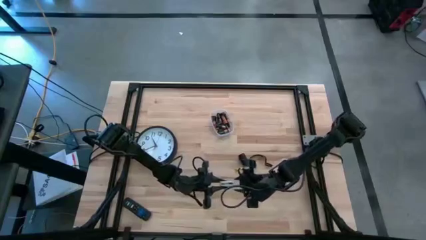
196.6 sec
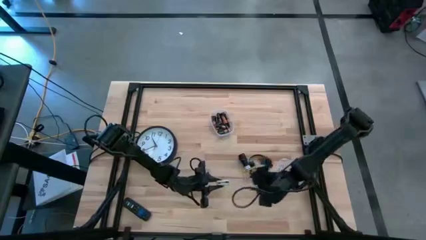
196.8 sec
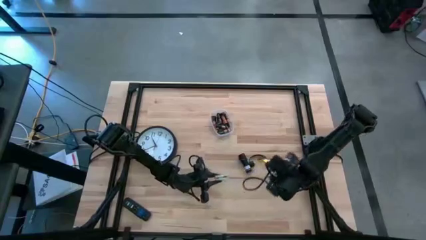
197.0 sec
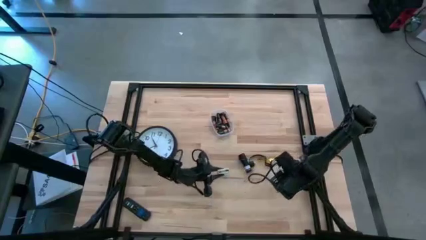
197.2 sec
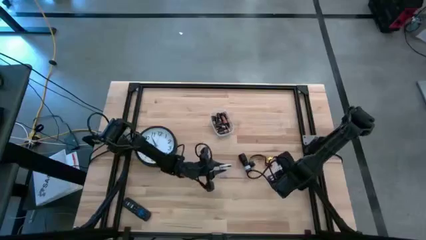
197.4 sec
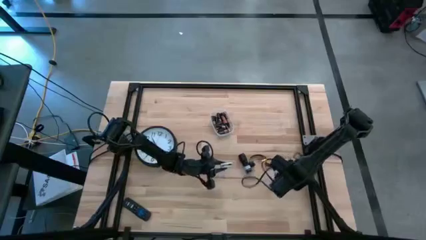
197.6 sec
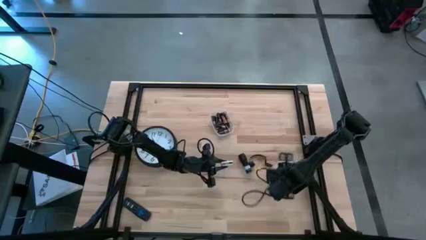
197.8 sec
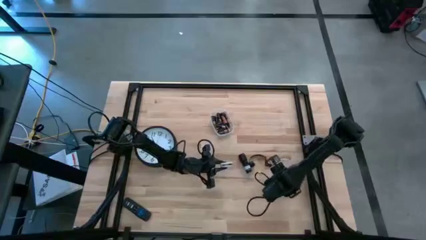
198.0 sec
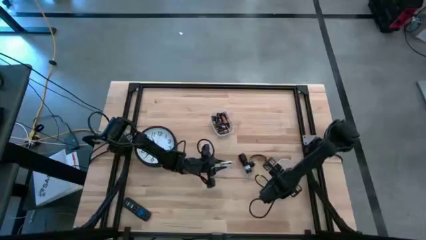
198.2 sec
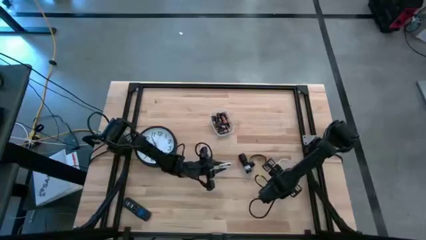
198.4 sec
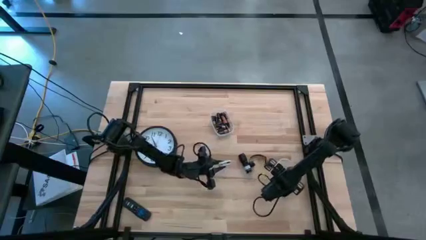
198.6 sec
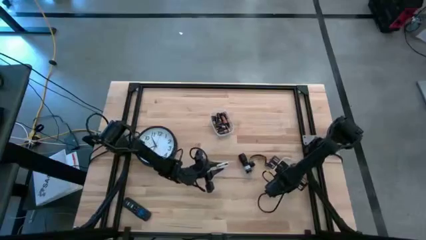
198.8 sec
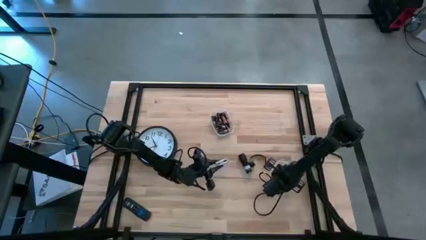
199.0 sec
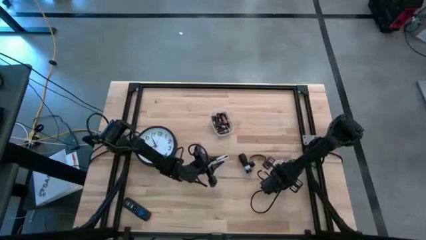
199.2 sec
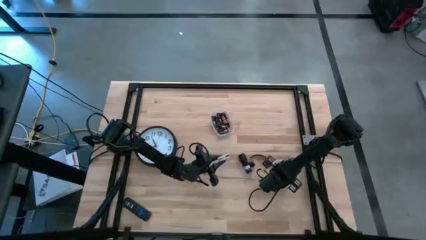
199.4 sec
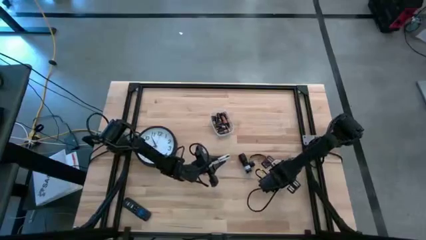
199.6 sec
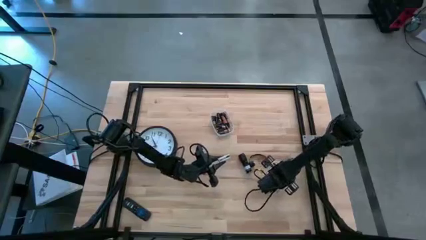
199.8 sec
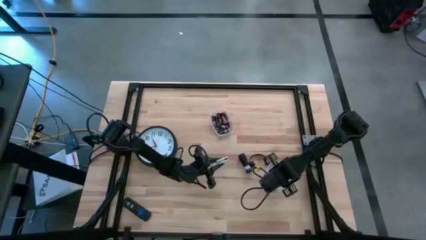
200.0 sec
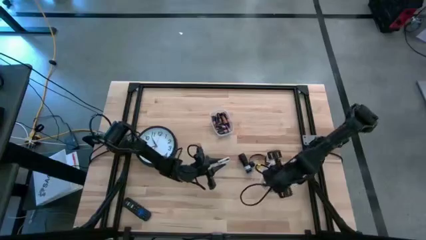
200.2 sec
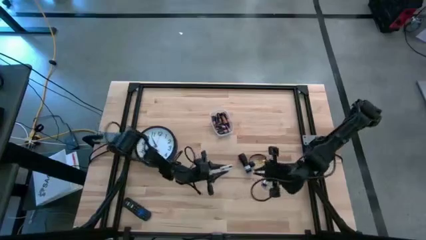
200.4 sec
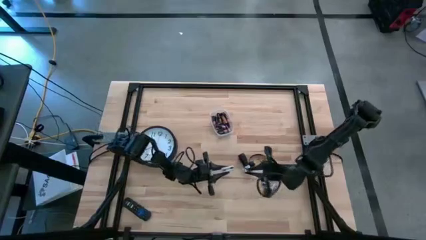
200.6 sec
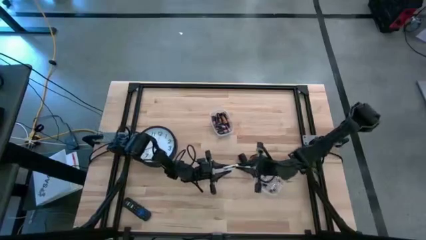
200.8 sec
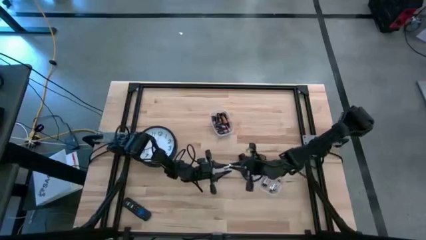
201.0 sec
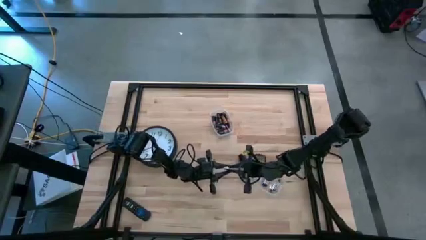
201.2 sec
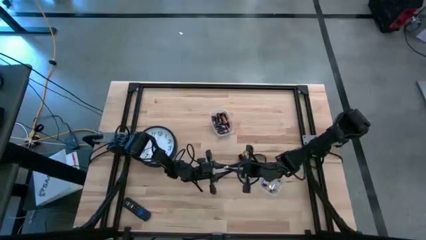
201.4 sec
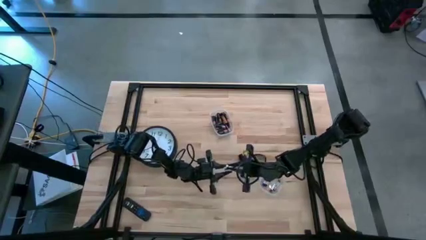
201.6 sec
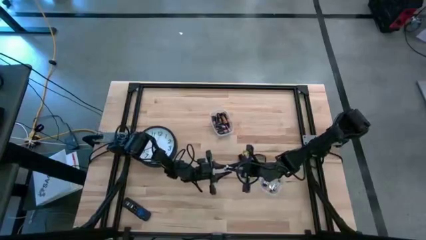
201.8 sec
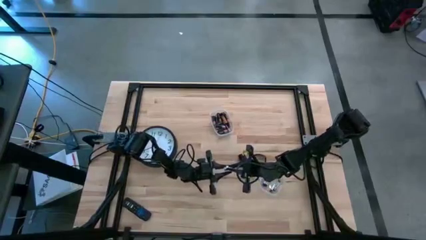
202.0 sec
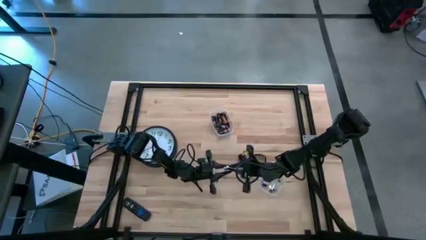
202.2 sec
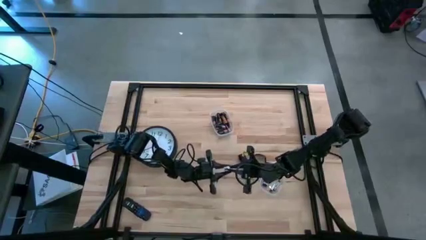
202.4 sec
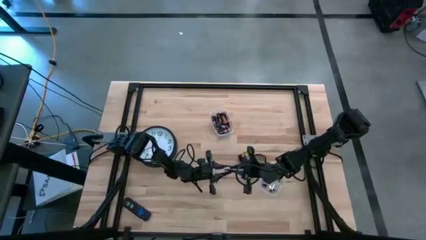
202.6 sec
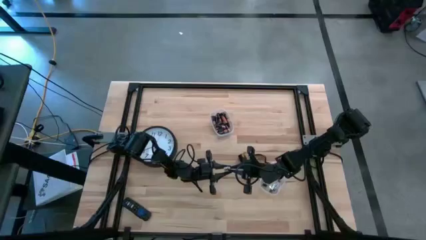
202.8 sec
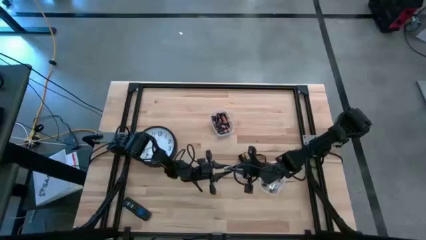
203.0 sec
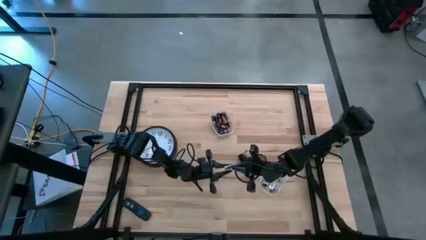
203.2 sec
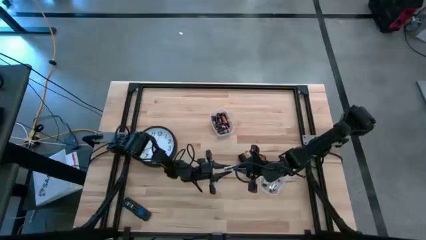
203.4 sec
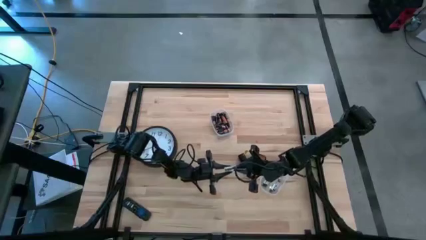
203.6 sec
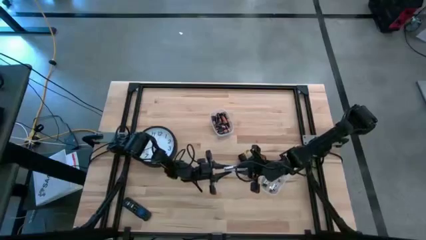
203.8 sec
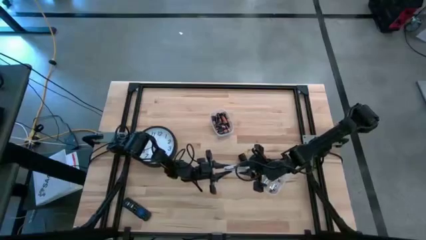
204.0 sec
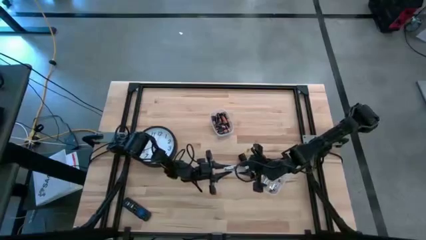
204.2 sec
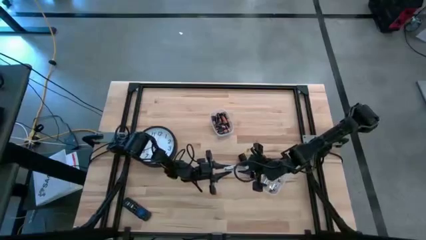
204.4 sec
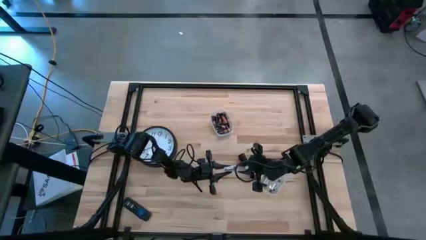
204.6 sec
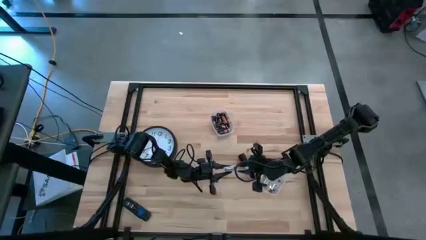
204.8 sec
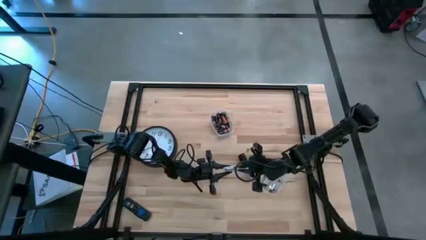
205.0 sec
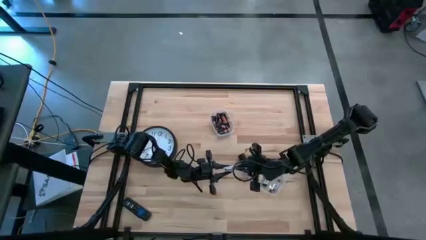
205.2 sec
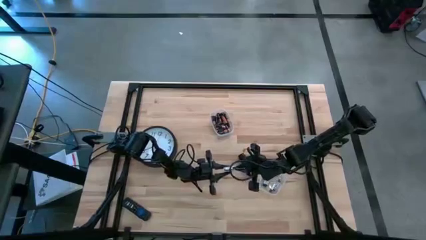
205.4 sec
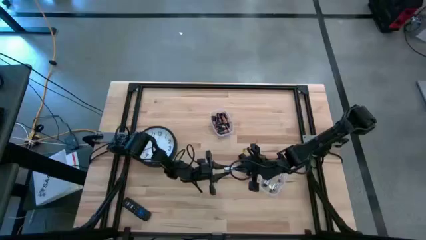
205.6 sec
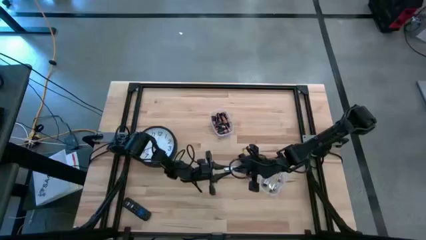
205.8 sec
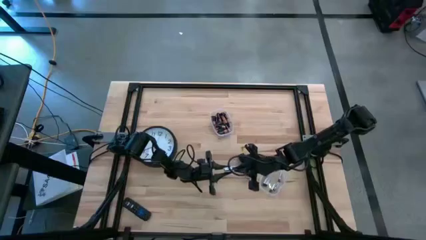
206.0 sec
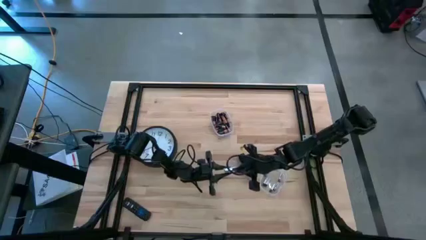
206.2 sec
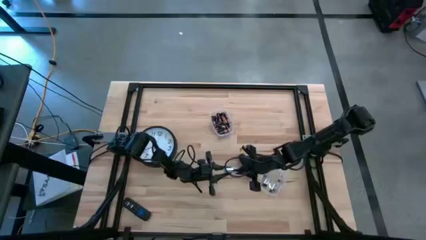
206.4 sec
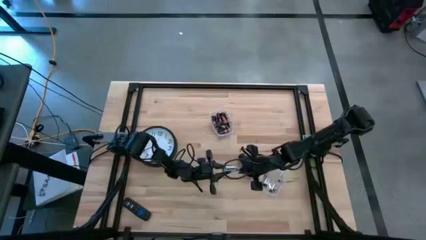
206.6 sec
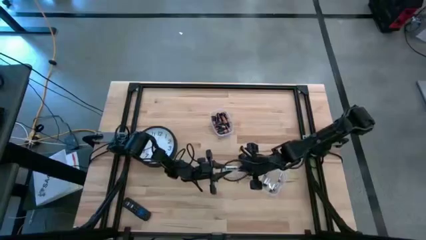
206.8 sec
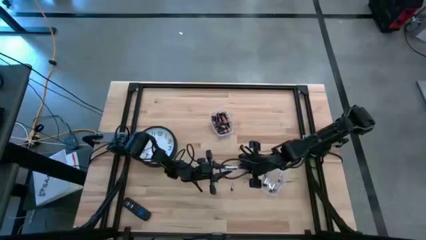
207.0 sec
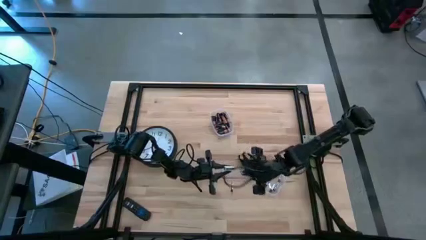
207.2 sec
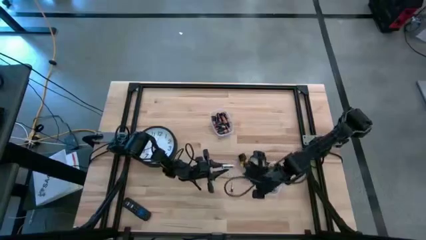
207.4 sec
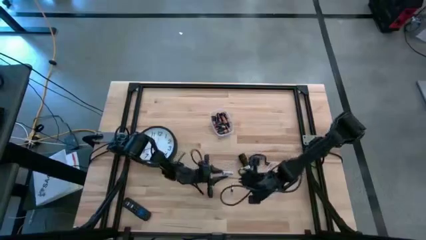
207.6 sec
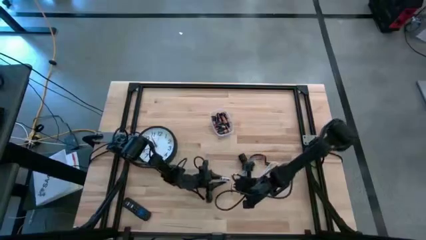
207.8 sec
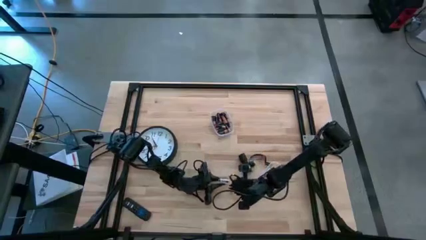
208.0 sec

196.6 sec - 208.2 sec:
Task: Insert battery
Insert the silver battery into the battery holder

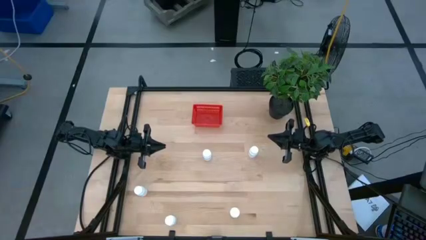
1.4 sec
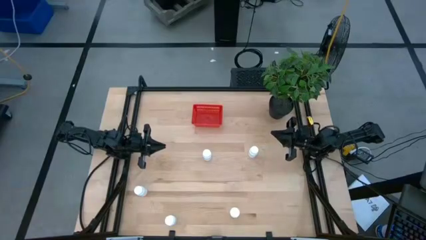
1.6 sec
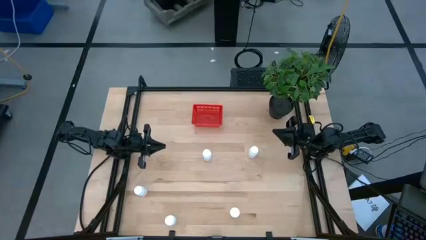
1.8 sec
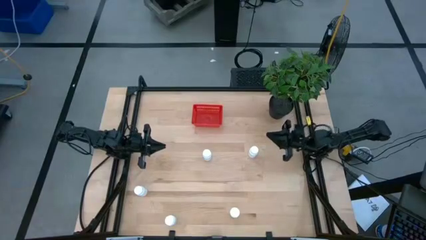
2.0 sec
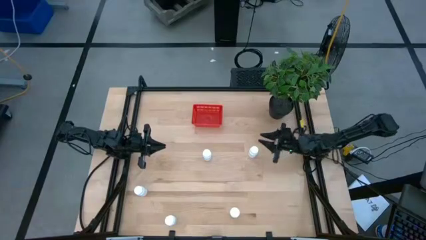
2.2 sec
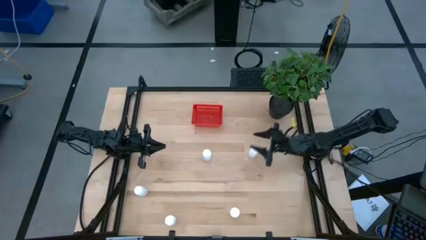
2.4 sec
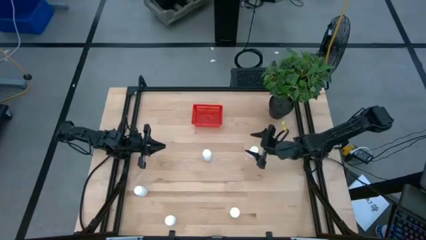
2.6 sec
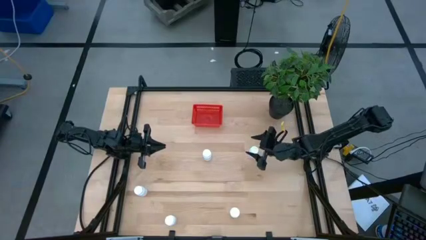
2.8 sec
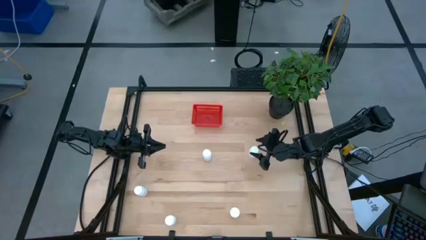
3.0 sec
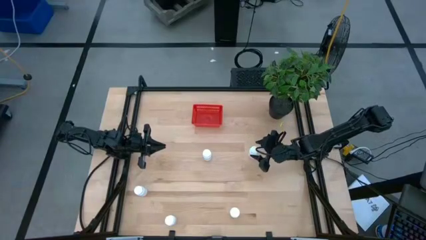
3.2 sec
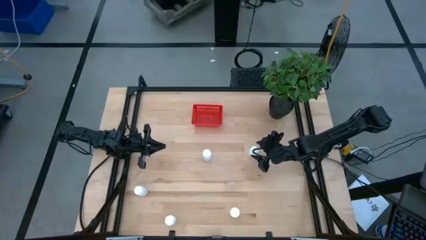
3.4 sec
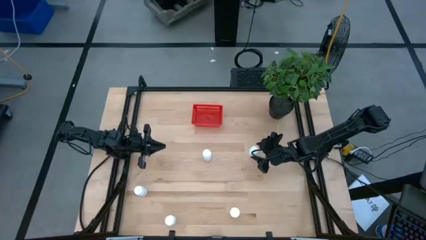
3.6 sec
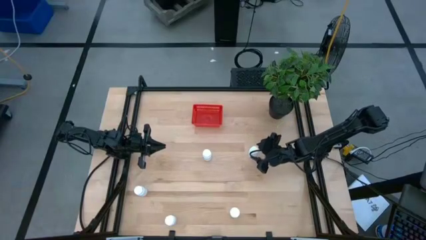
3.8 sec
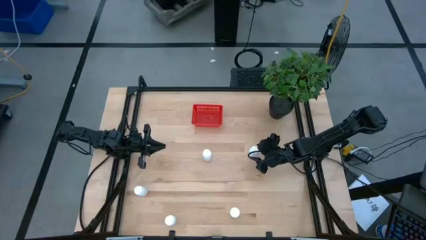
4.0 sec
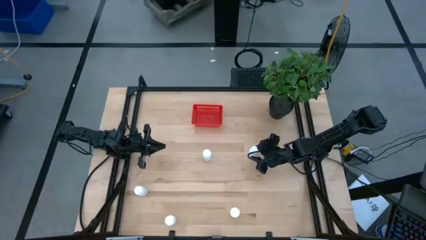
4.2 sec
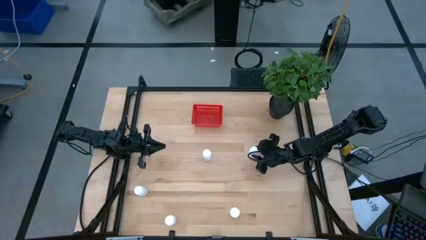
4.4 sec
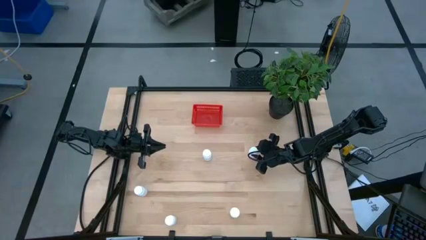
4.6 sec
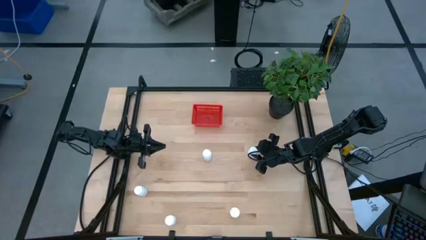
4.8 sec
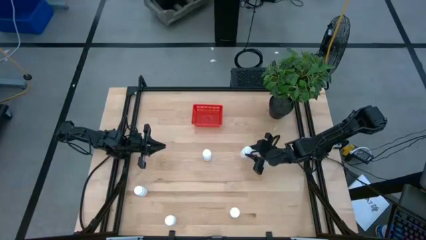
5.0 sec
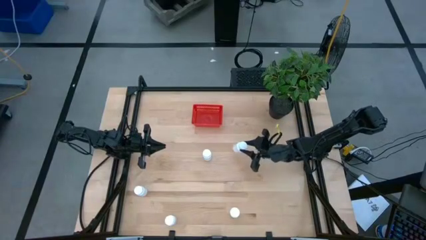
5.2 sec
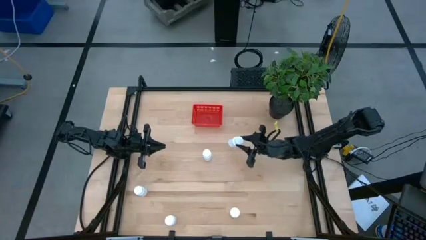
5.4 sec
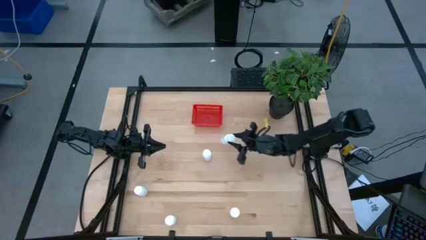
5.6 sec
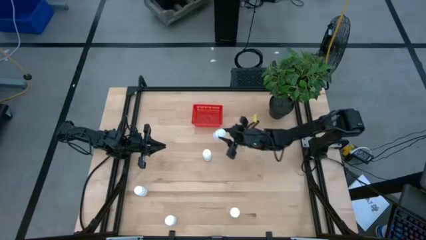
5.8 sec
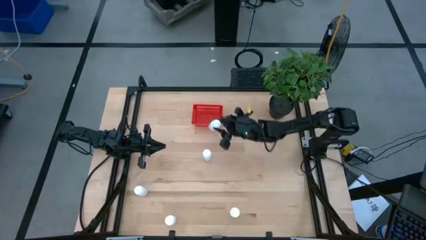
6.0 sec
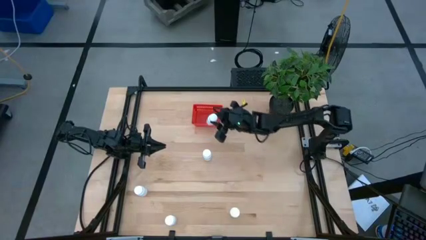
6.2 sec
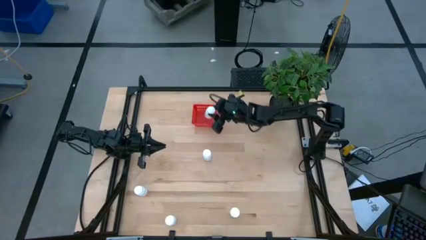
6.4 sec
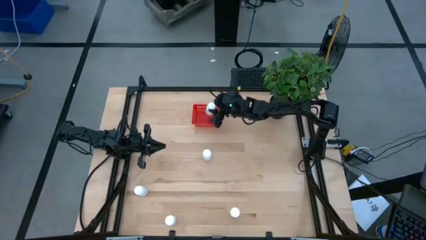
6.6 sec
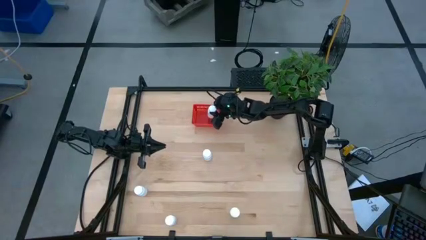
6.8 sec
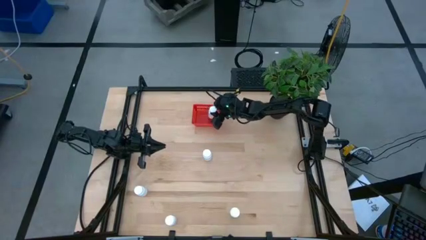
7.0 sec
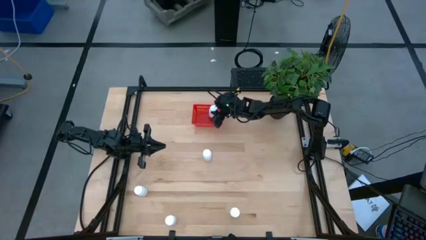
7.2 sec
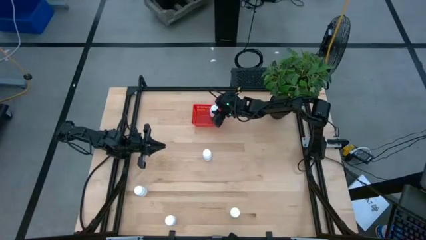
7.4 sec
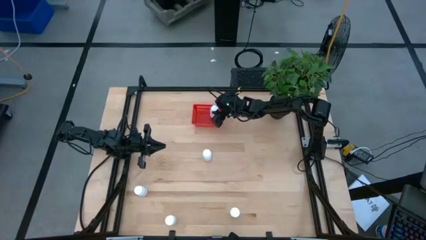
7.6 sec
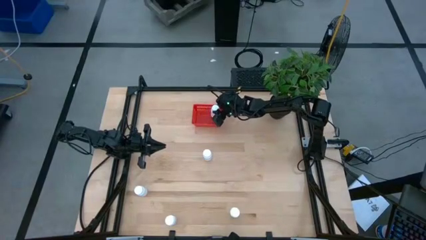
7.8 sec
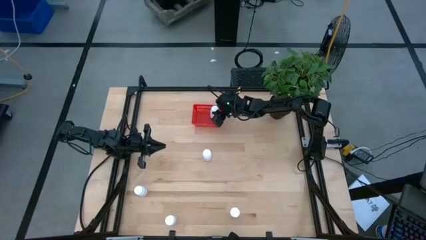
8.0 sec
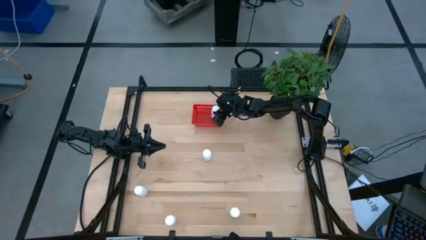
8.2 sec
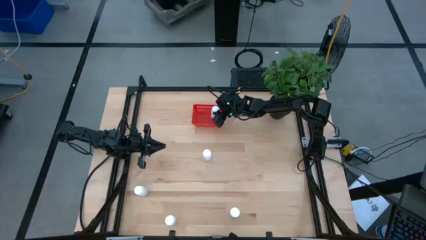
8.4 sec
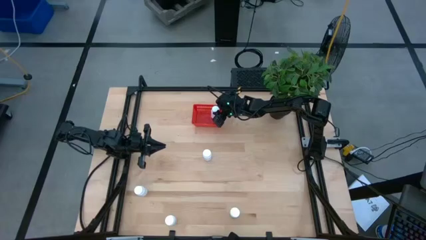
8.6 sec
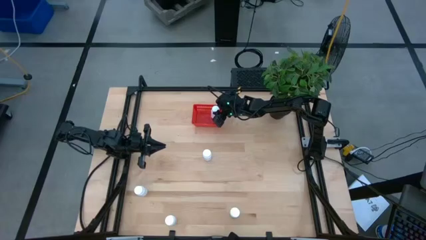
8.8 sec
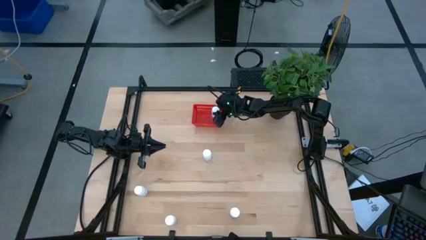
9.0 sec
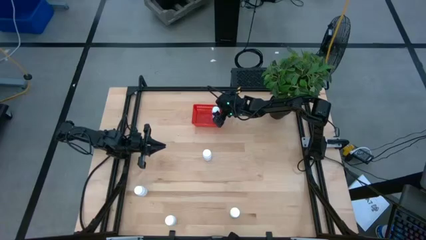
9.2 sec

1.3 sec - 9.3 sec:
Task: Pick and place pill bottles into a basket
Put the white pill bottle into the orange basket
